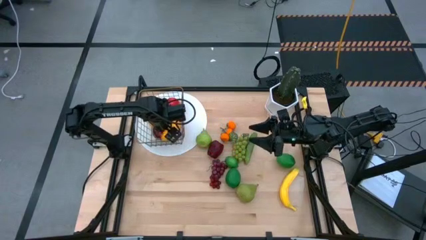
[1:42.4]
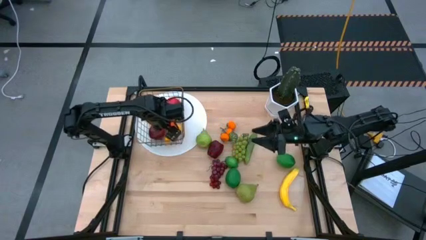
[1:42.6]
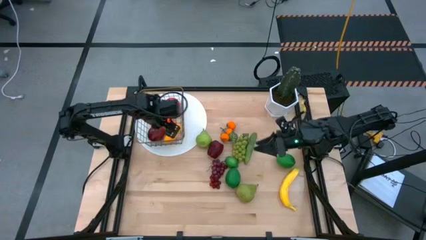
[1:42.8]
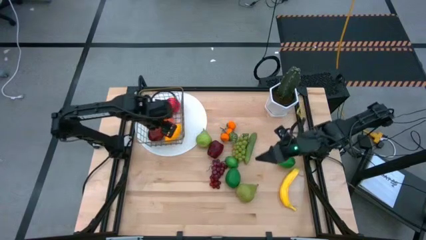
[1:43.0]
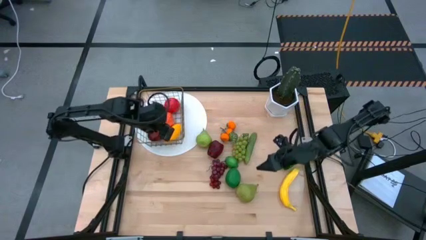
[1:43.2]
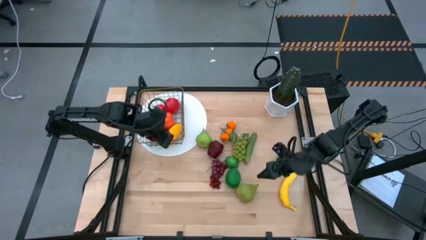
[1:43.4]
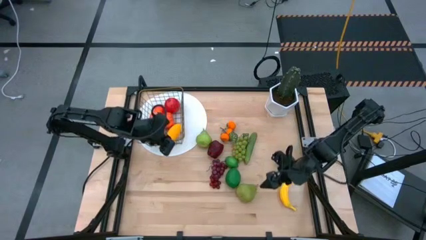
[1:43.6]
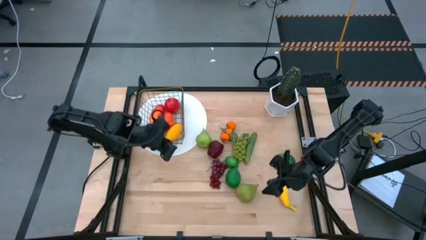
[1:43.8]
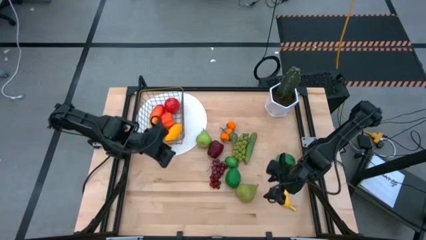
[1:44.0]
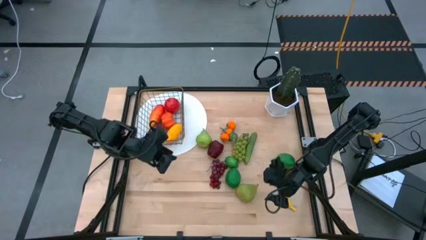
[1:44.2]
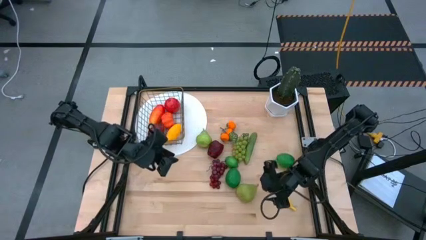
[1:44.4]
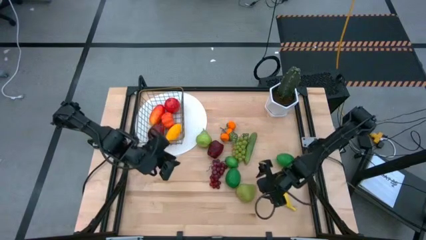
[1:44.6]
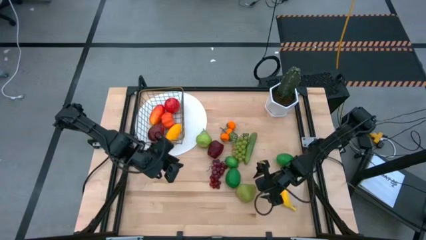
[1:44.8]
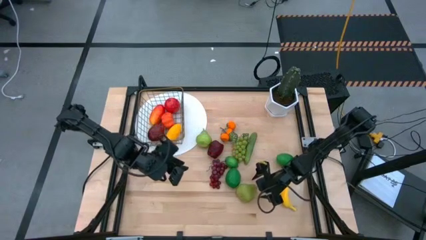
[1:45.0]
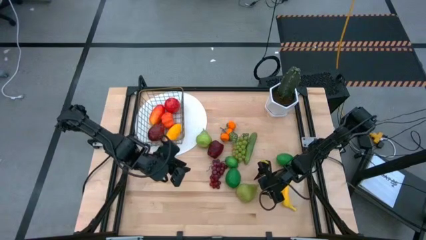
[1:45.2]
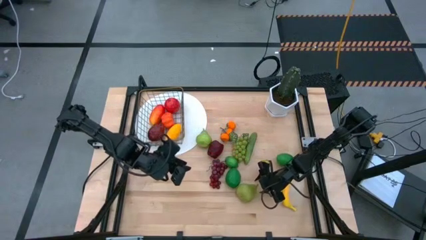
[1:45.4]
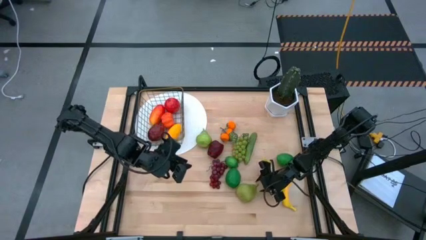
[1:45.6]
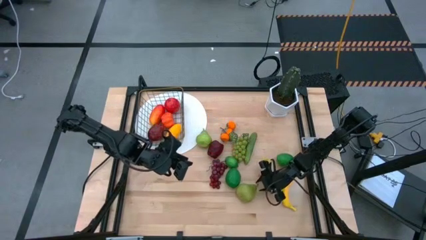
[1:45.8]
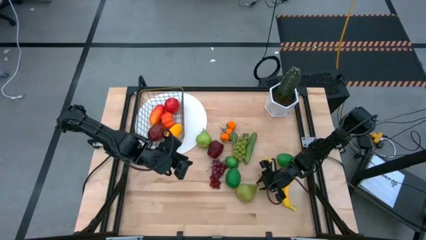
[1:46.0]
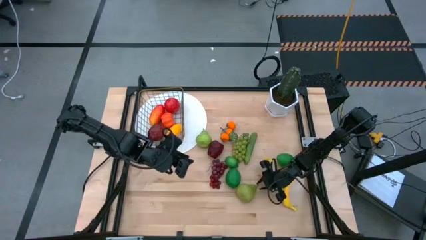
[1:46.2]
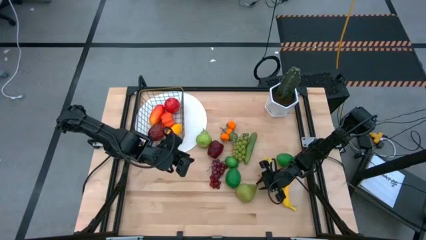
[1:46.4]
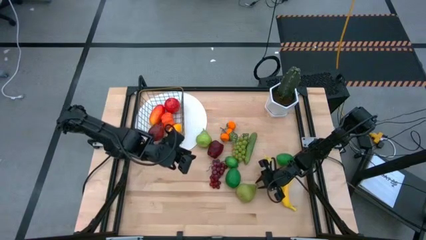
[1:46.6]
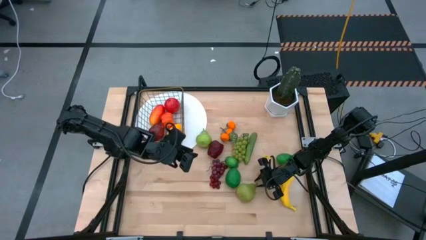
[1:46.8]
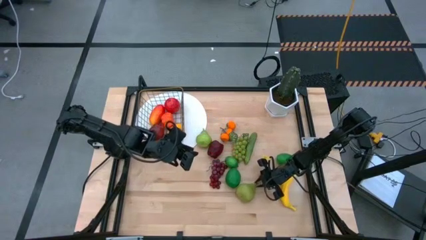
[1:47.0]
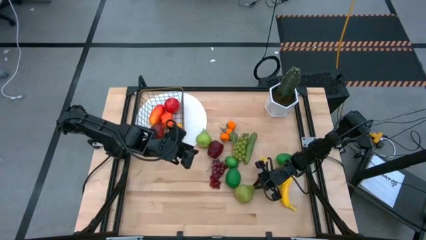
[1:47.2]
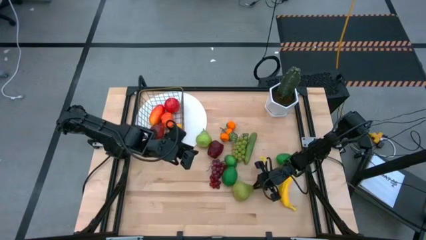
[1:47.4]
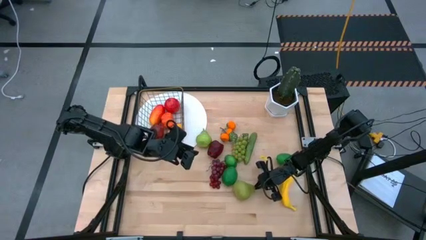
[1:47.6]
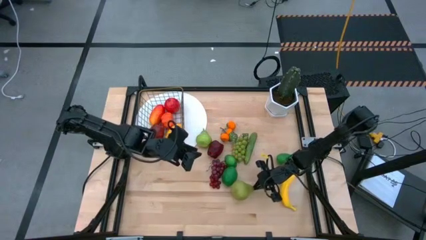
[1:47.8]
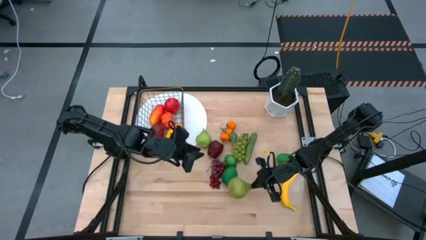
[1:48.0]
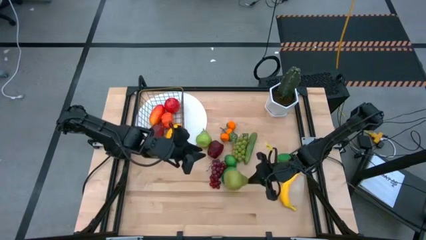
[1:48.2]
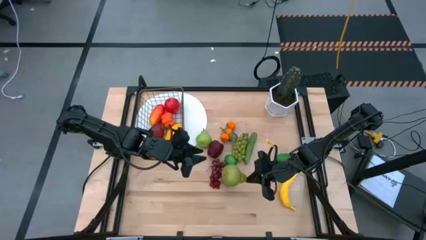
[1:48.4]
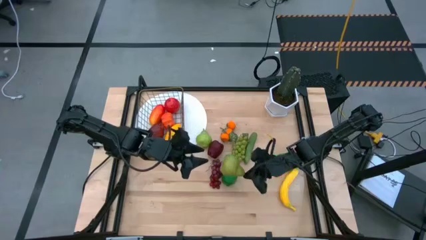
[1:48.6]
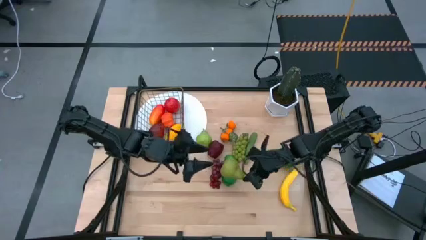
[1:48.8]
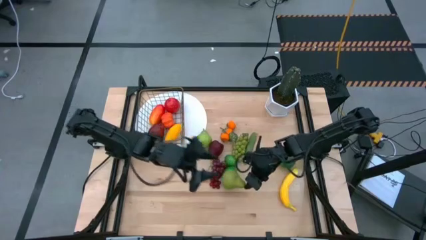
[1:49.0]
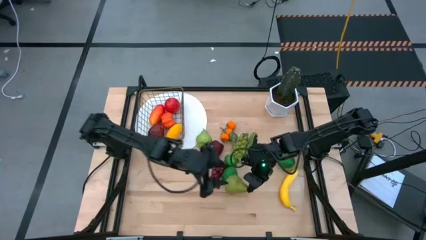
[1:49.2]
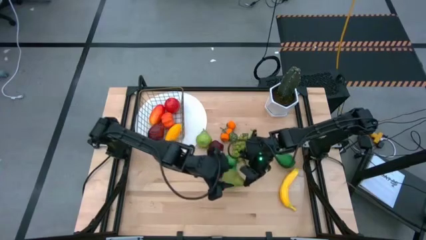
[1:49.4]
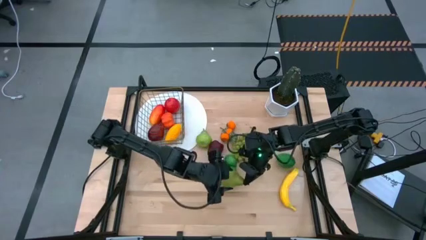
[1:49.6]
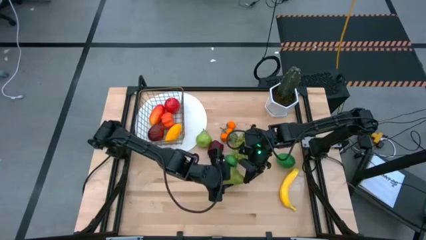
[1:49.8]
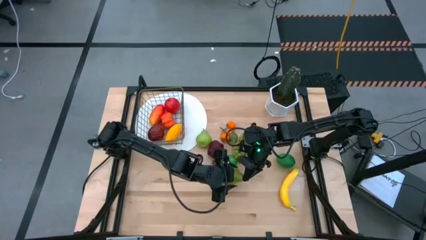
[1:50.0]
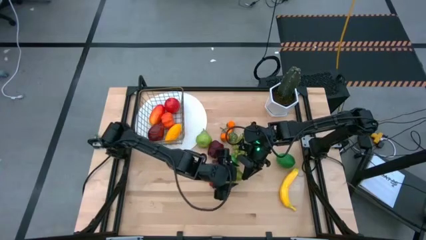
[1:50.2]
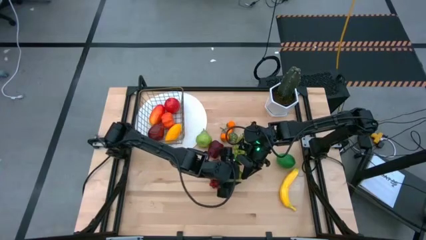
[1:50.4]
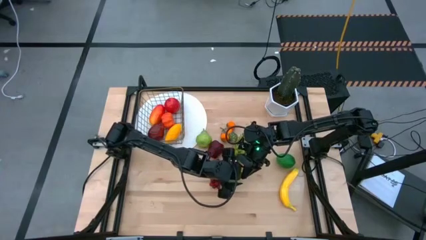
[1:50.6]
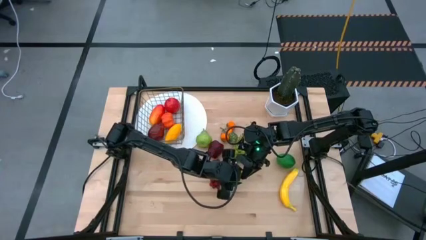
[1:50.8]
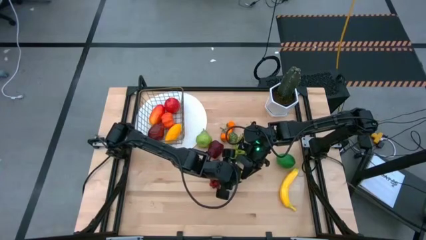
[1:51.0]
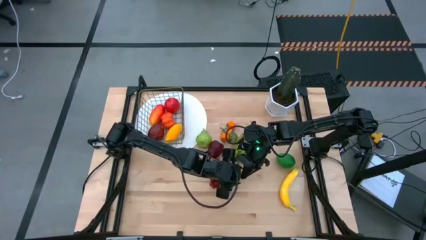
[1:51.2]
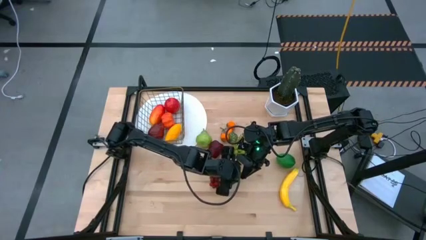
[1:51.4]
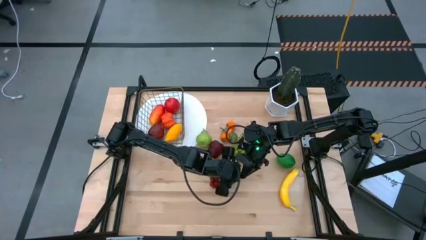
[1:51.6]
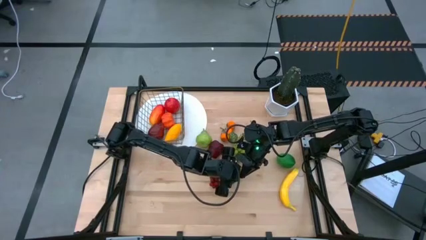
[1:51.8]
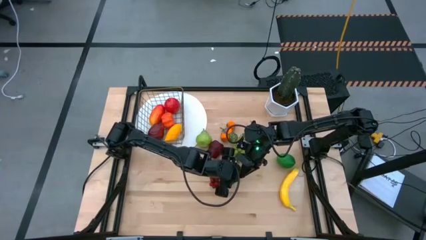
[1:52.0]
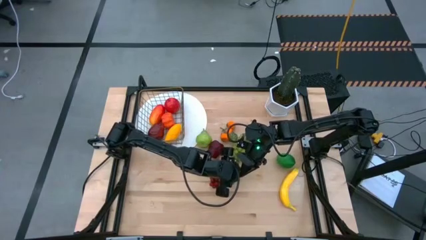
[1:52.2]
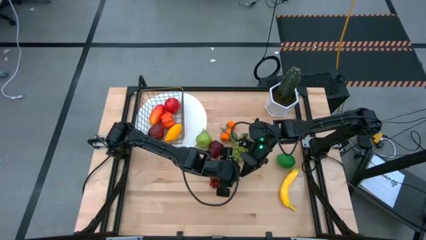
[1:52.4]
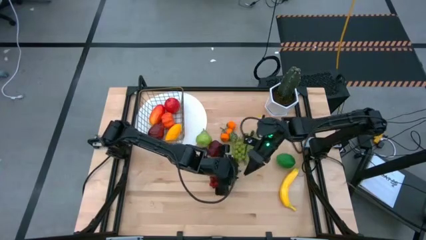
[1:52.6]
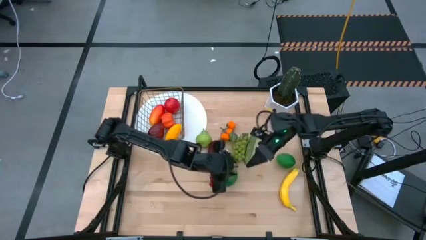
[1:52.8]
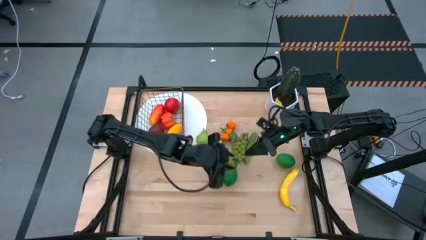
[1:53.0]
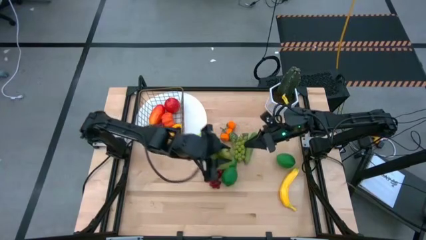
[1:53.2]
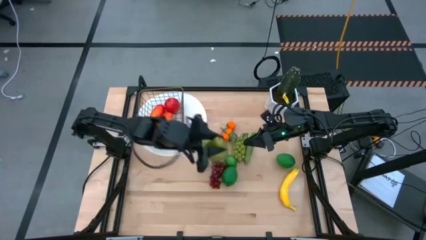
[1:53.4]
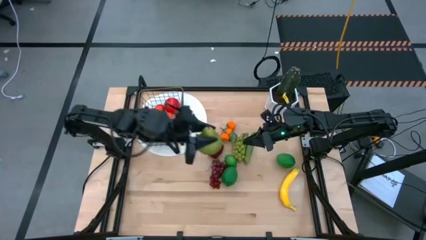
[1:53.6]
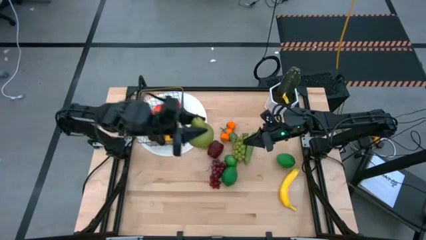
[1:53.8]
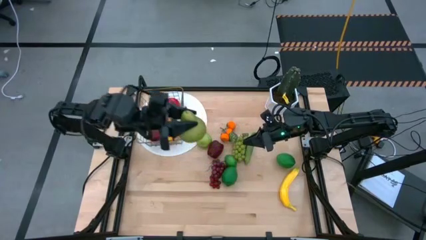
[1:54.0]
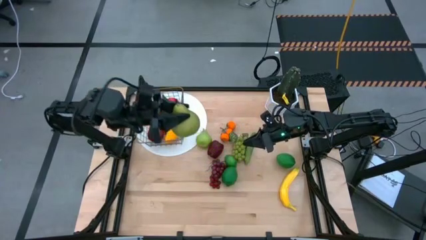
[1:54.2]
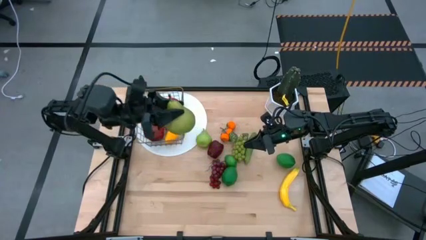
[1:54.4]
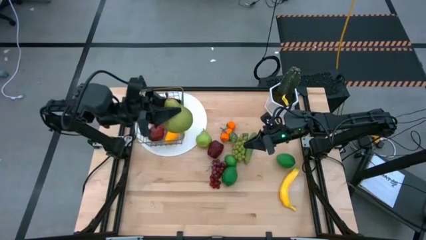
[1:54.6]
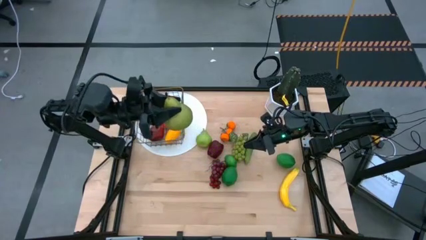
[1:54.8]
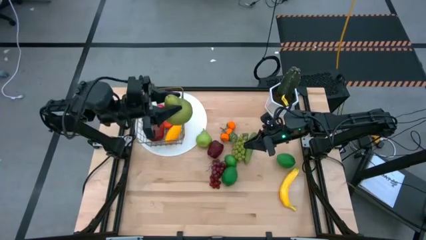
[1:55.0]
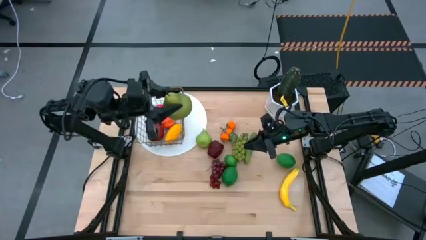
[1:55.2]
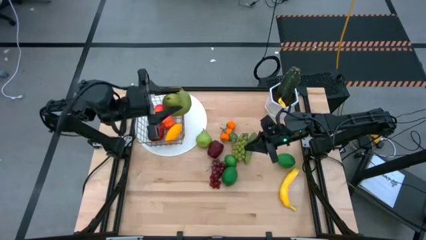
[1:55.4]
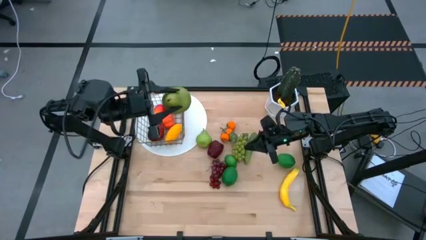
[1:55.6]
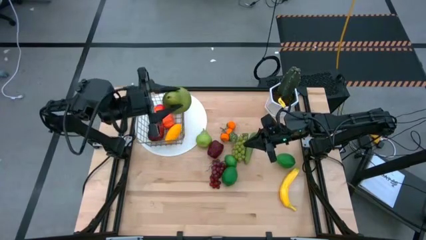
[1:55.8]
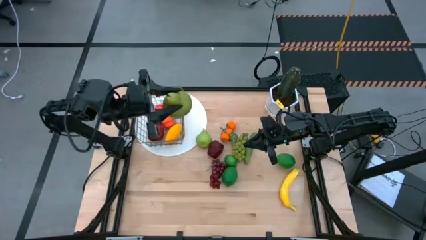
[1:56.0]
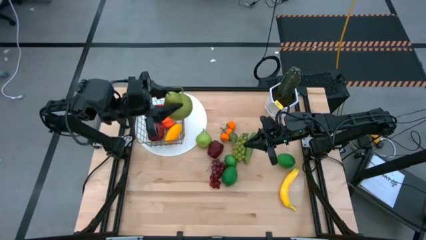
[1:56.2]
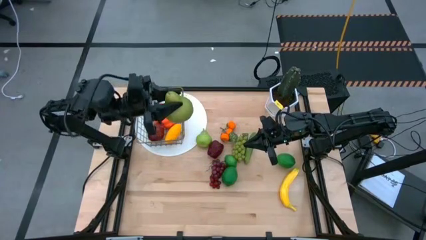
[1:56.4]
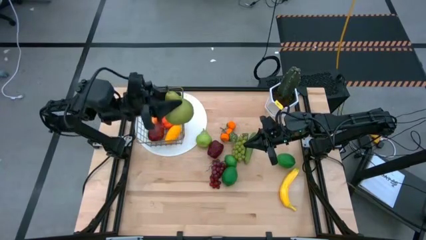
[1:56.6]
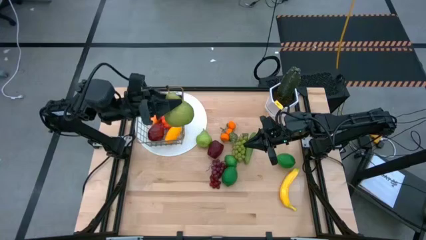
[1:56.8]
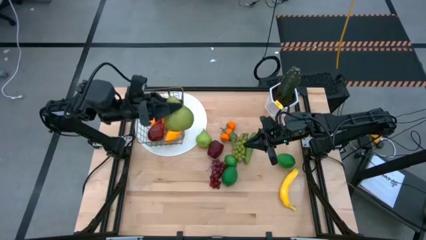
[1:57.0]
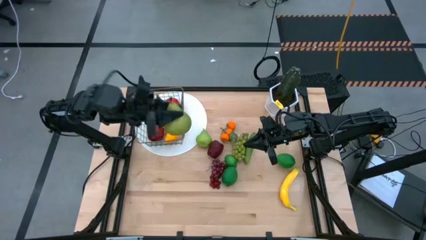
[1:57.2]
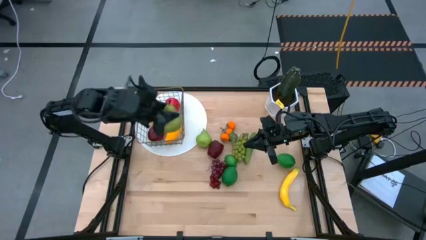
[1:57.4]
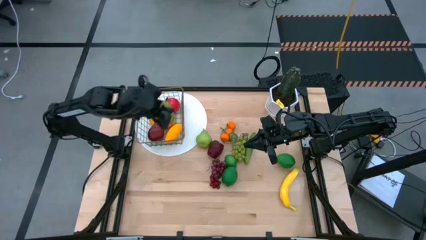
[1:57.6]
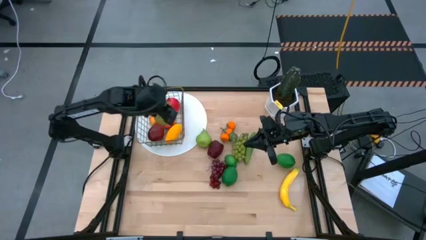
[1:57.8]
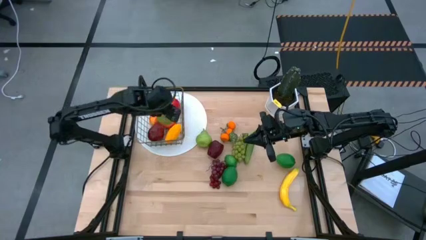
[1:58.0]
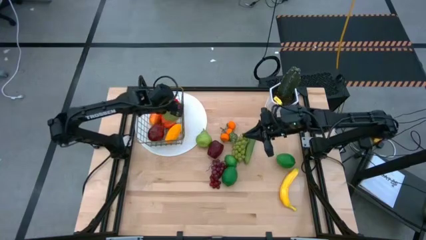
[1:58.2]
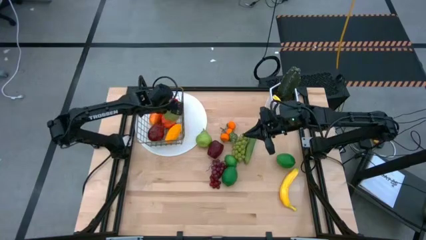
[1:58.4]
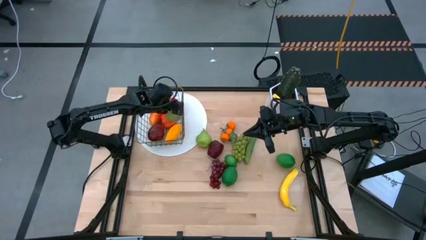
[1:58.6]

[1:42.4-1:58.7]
Task: Build produce basket
Put the bottom green pear into the wire basket

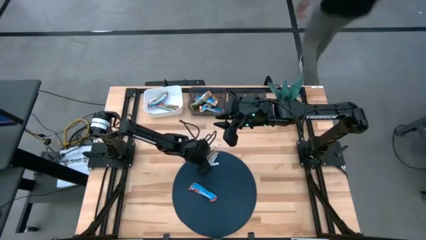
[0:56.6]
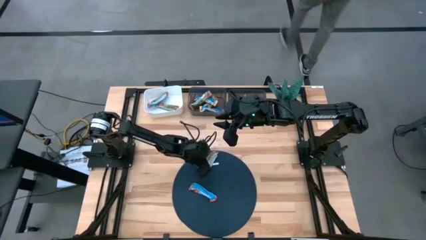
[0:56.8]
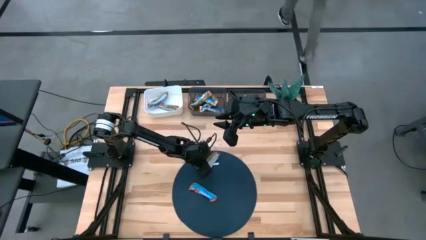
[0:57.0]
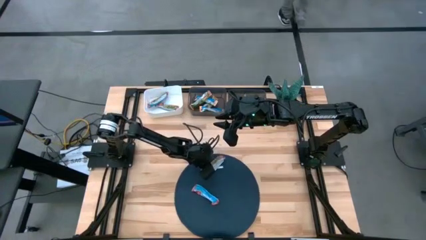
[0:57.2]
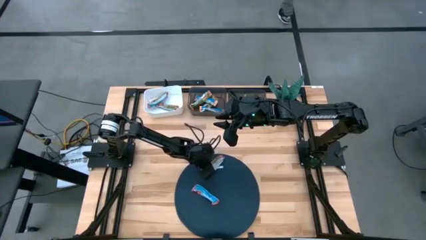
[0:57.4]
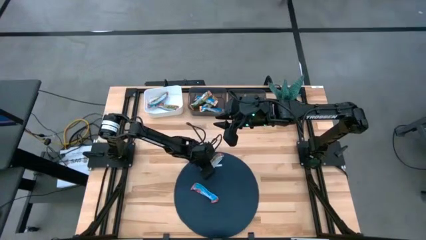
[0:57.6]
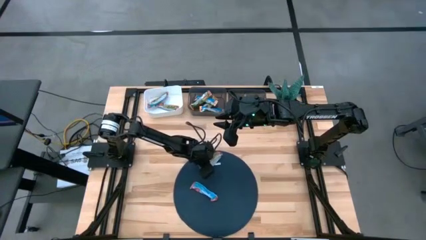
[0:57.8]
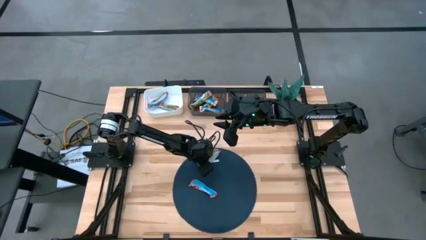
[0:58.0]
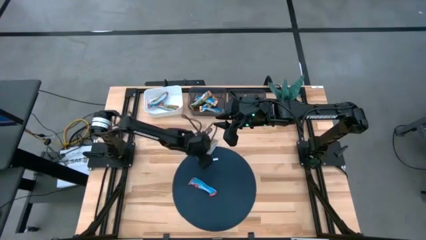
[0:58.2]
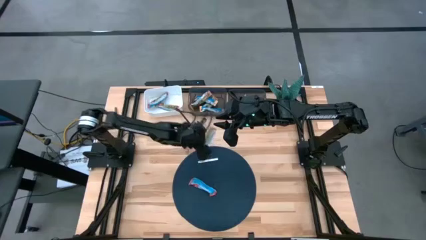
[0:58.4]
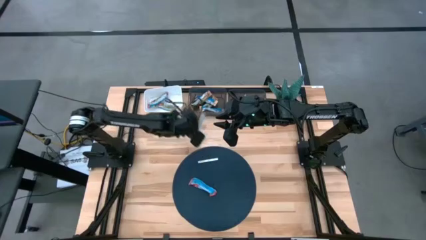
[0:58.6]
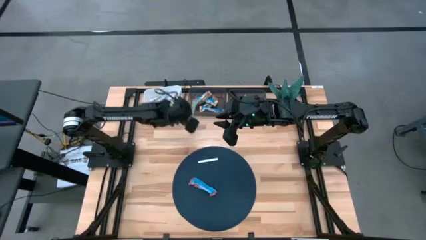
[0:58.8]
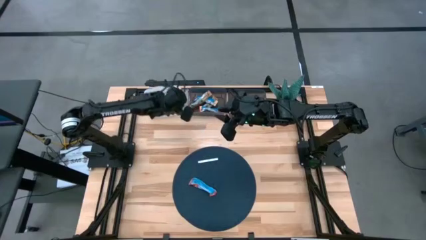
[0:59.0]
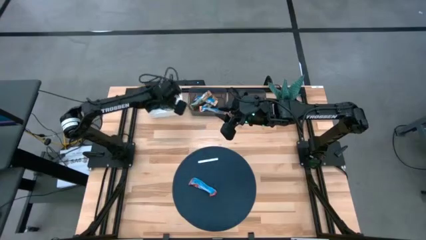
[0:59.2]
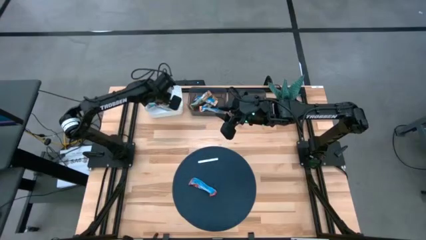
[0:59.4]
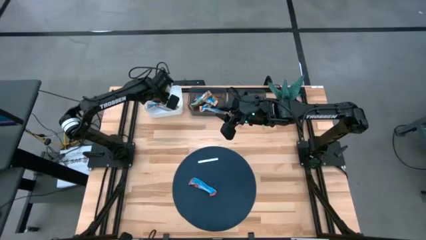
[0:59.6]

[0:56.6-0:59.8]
Task: Pick and place Granola Bars by type
Put the red granola bar into the white bin
